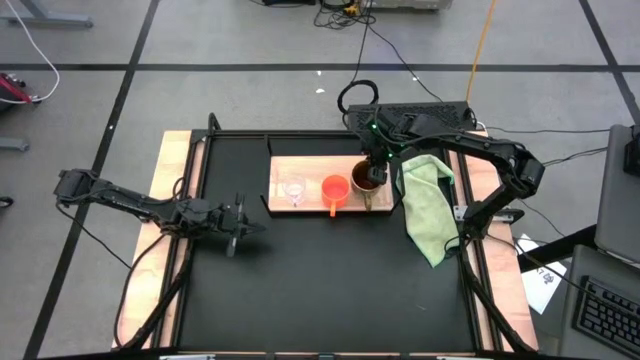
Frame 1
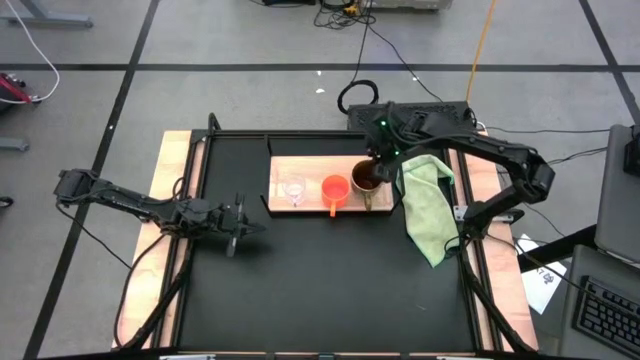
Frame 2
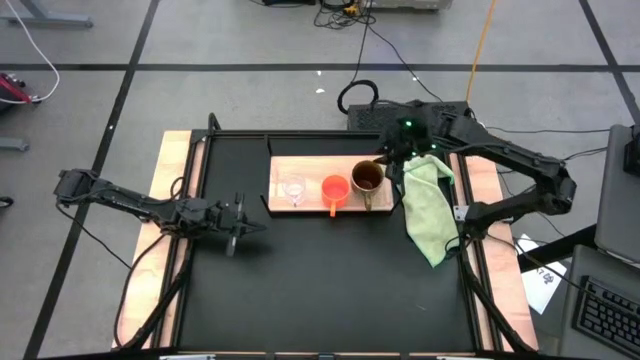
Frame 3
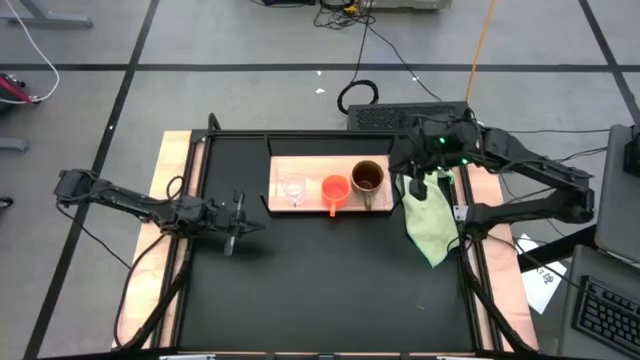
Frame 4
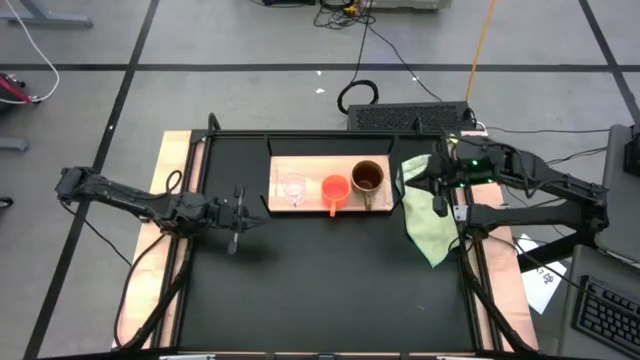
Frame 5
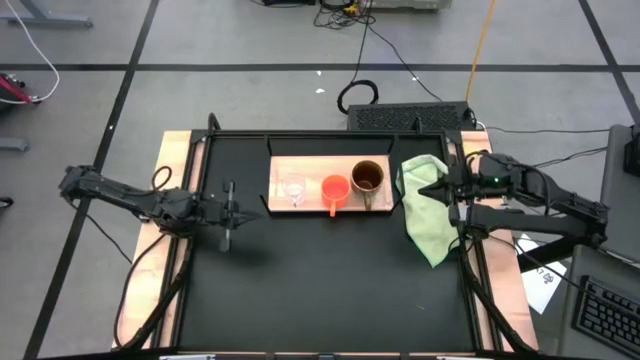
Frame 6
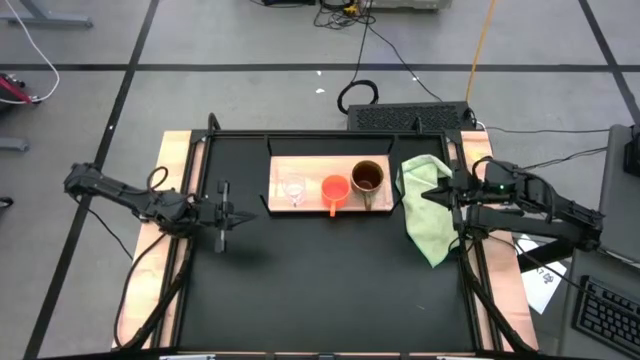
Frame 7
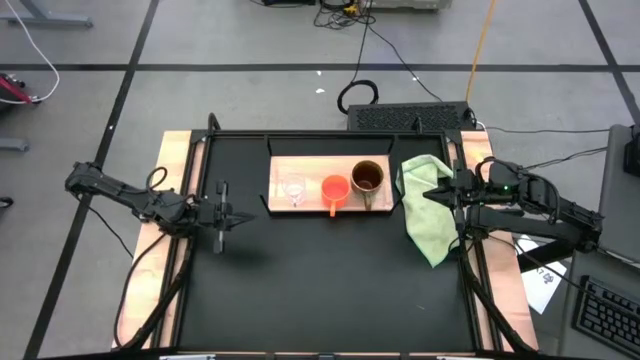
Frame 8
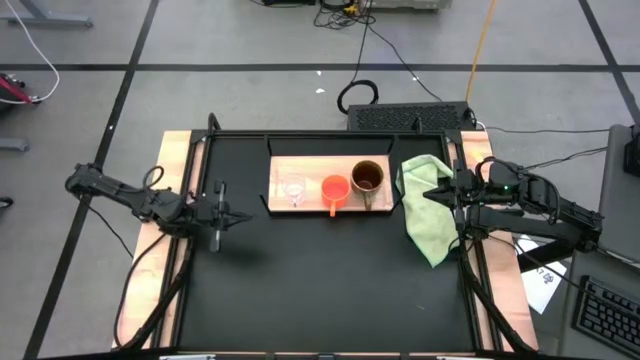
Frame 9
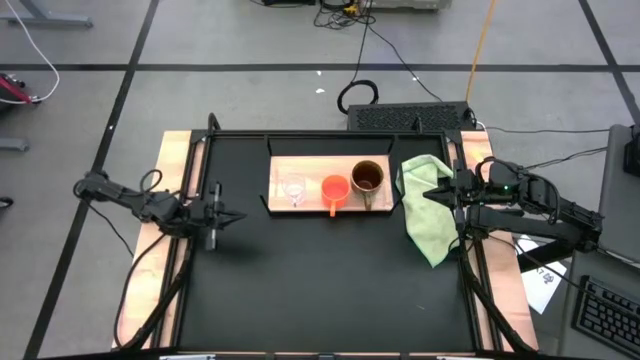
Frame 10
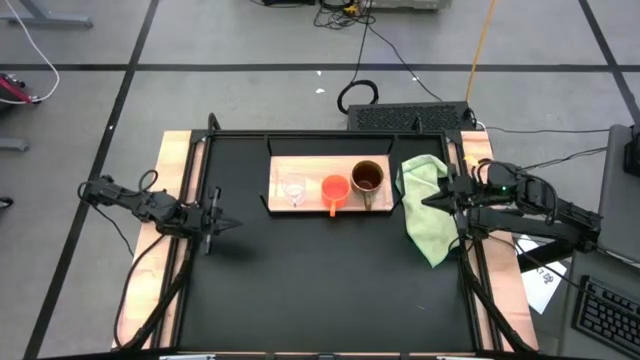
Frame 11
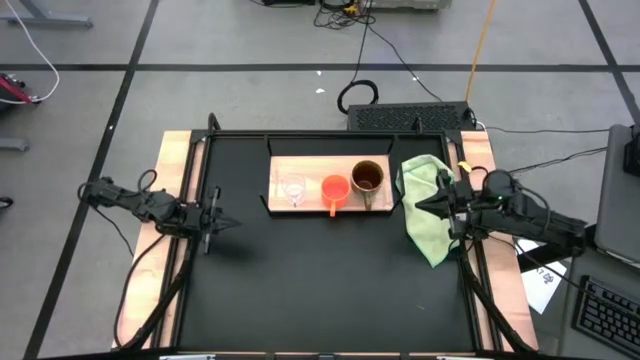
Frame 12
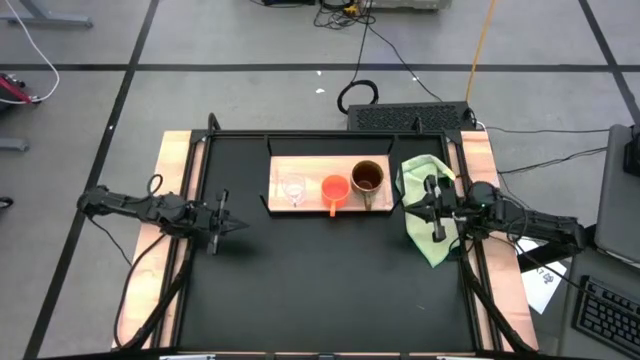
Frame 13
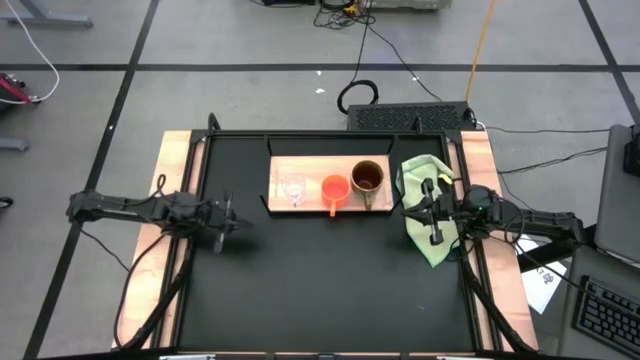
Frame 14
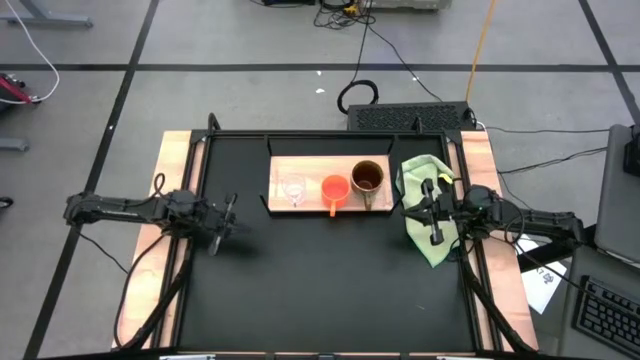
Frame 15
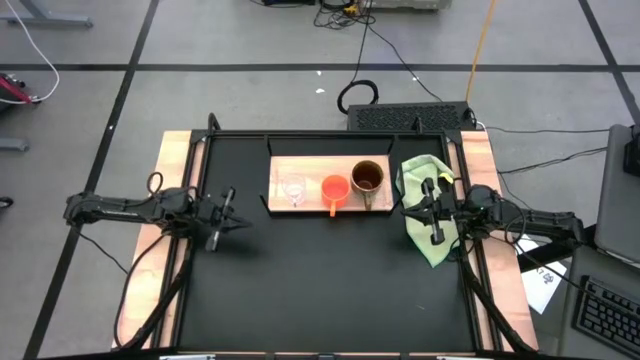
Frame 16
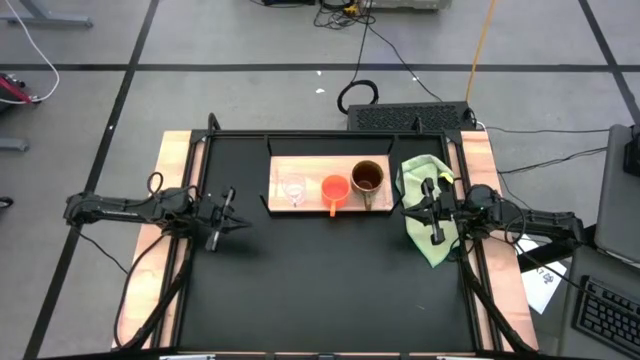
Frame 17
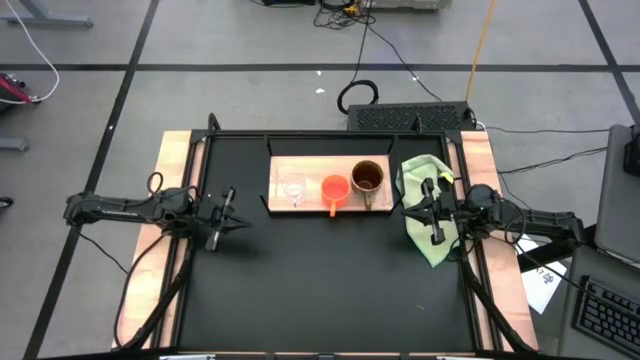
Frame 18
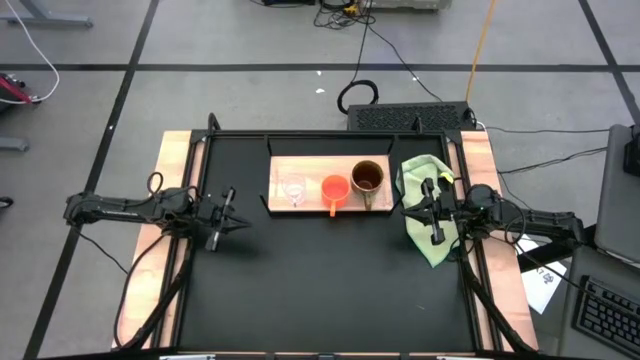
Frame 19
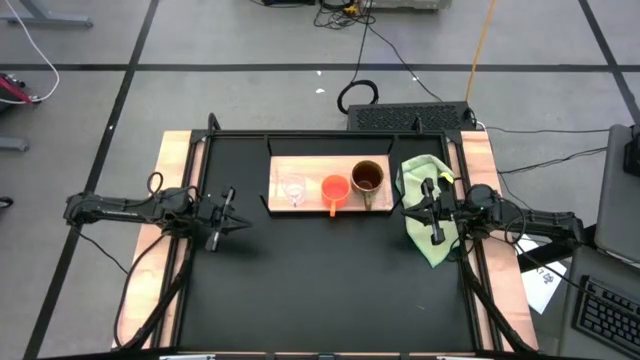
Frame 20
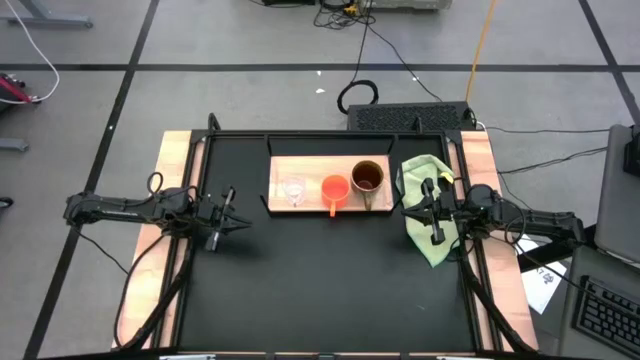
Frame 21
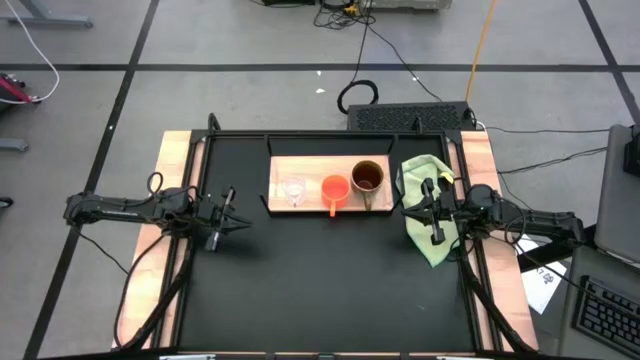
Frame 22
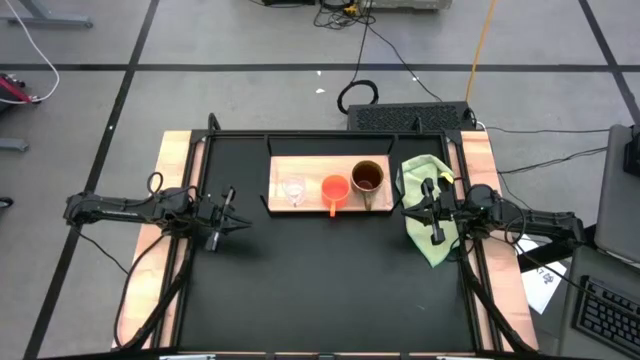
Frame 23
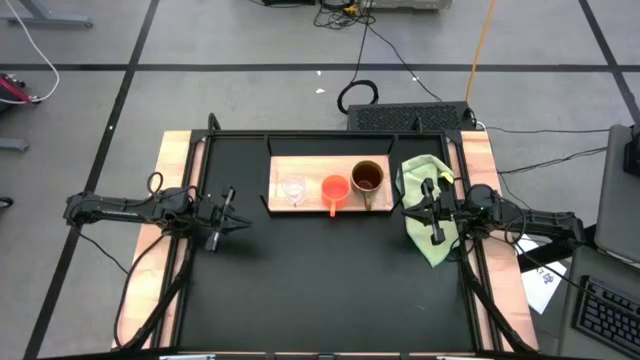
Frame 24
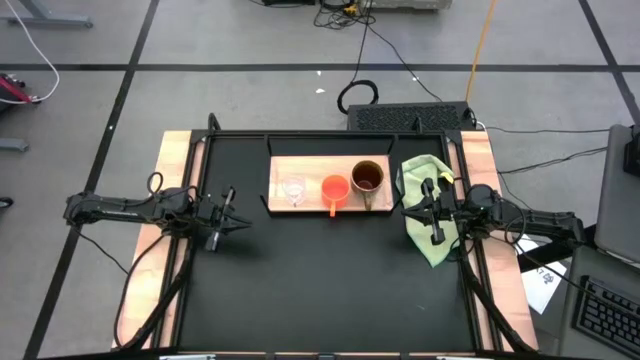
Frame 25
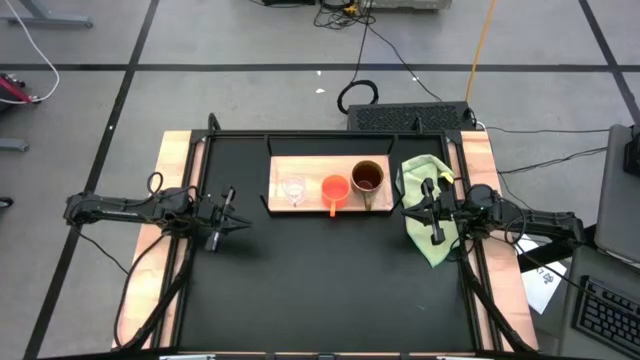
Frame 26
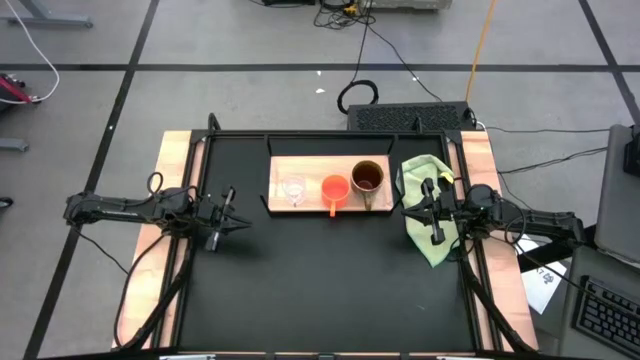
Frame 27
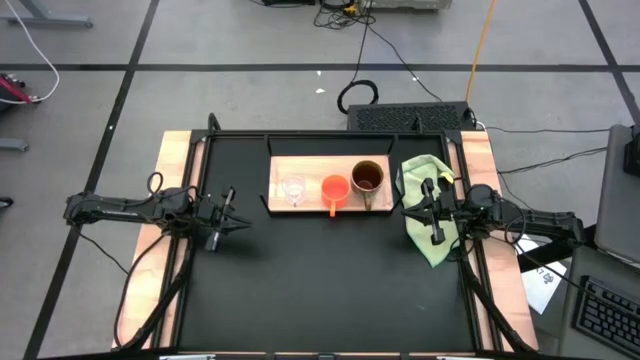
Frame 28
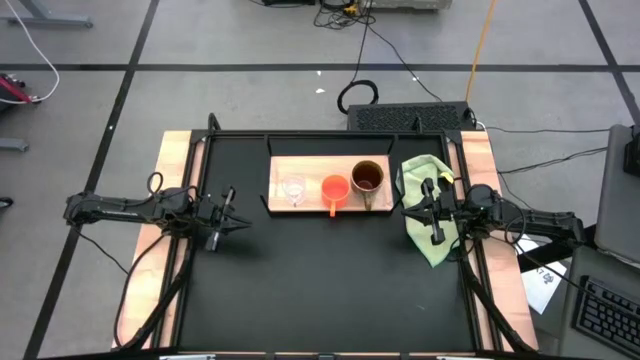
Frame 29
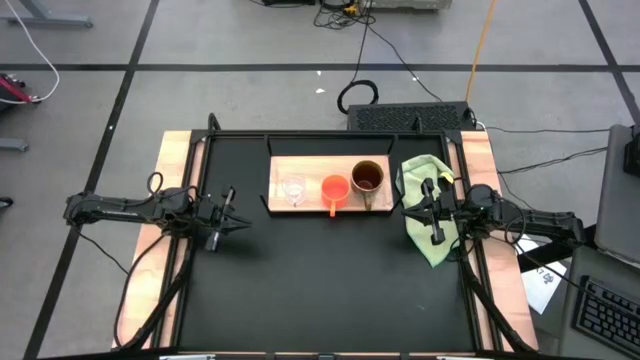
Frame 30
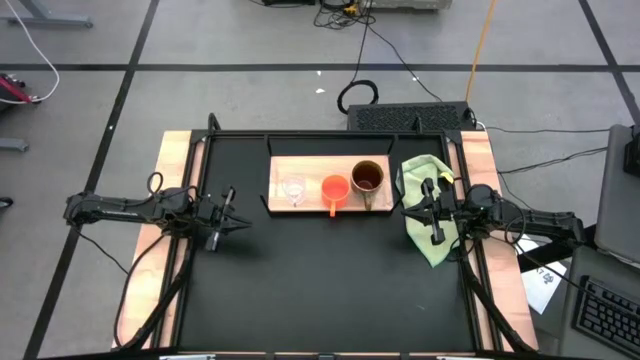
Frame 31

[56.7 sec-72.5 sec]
Task: Stack small to large cups/mugs on shelf
Return to Home Position
